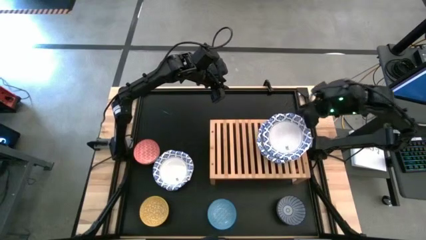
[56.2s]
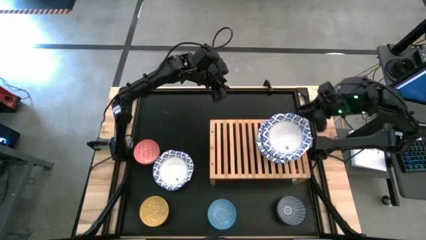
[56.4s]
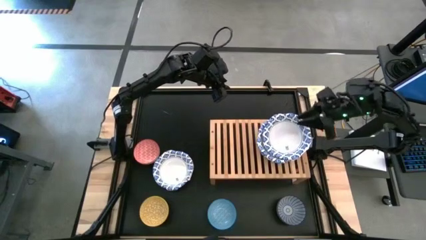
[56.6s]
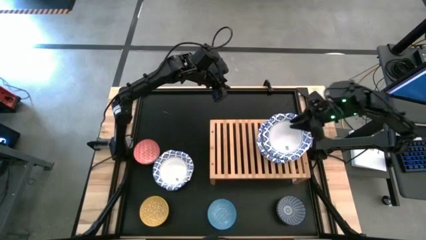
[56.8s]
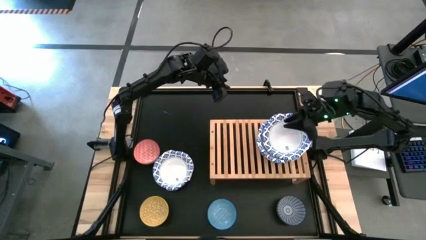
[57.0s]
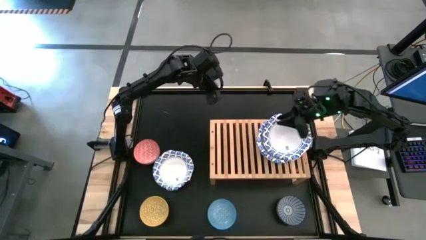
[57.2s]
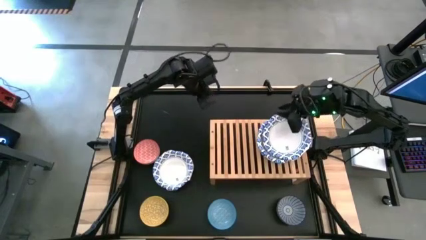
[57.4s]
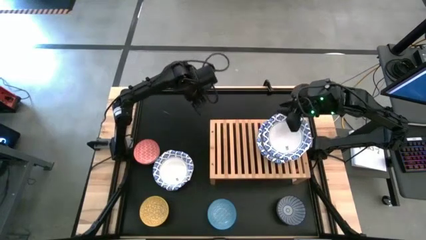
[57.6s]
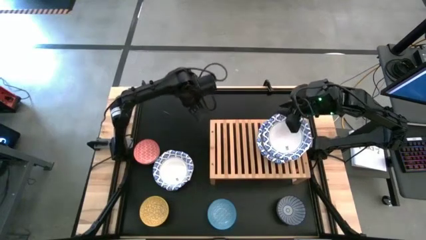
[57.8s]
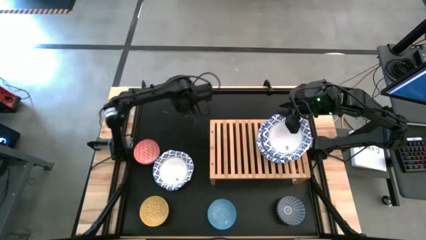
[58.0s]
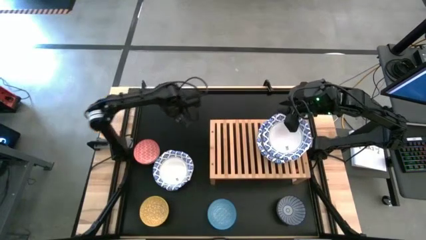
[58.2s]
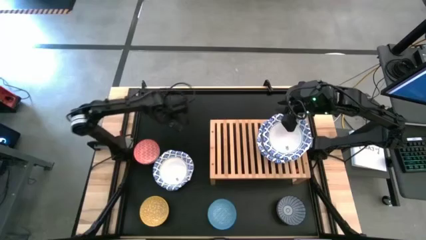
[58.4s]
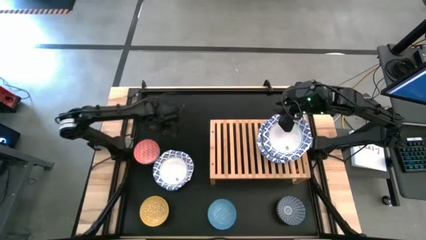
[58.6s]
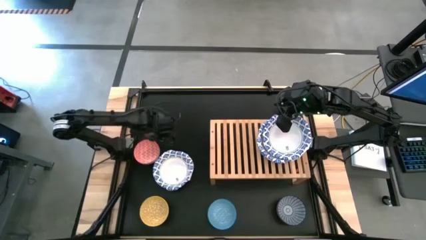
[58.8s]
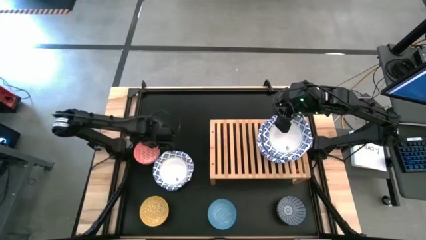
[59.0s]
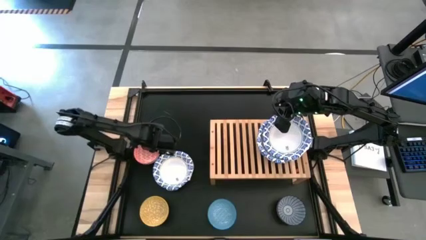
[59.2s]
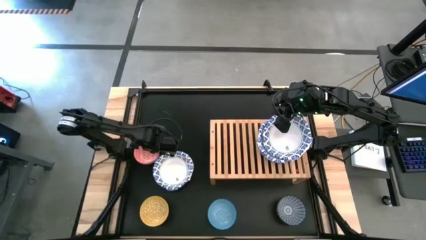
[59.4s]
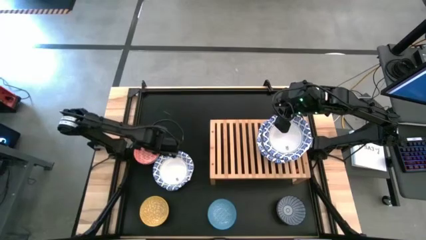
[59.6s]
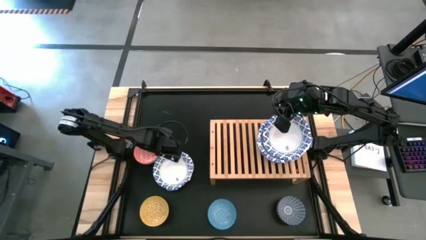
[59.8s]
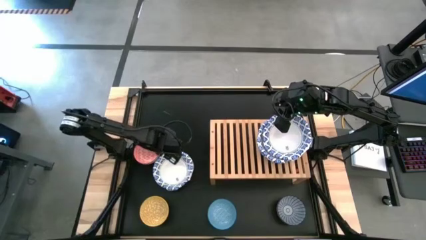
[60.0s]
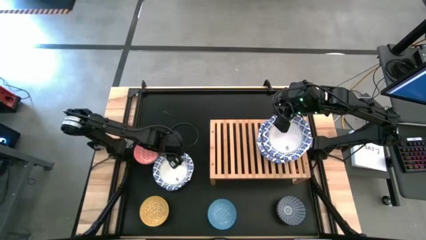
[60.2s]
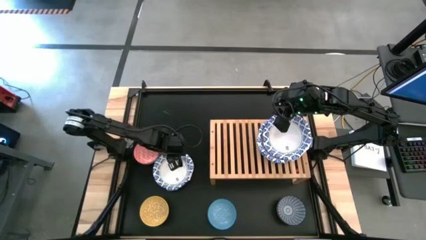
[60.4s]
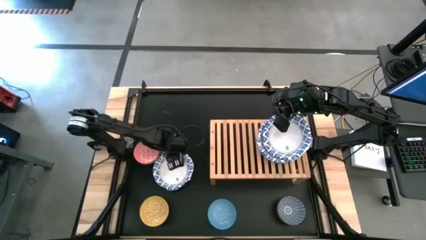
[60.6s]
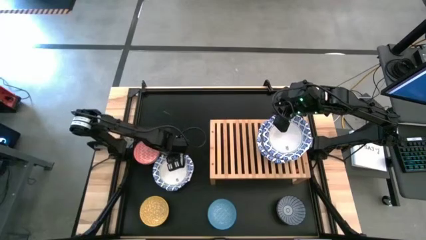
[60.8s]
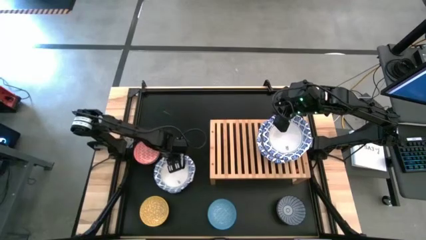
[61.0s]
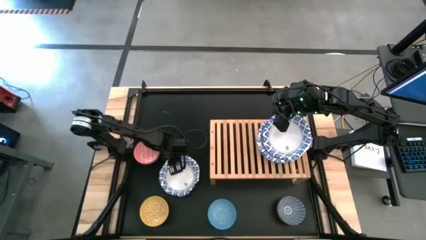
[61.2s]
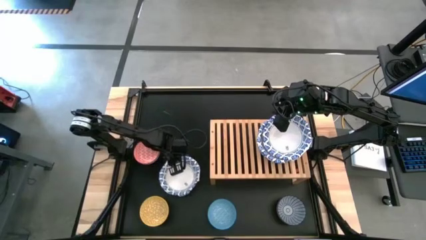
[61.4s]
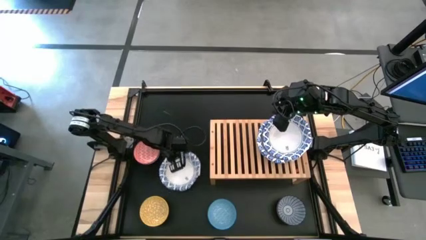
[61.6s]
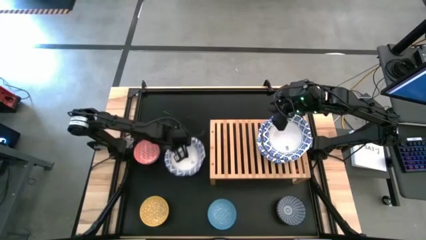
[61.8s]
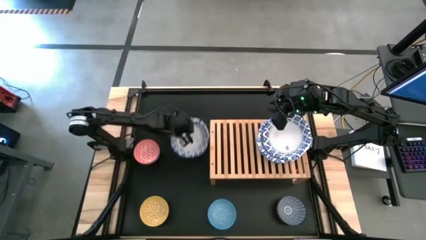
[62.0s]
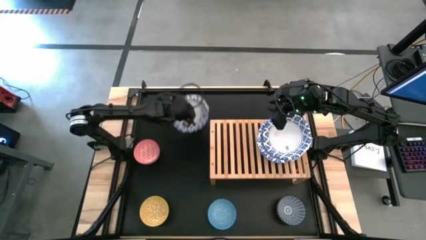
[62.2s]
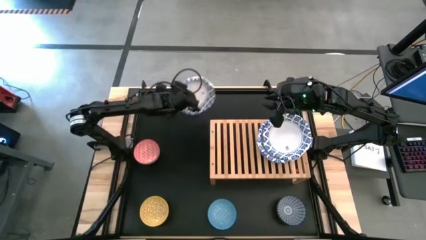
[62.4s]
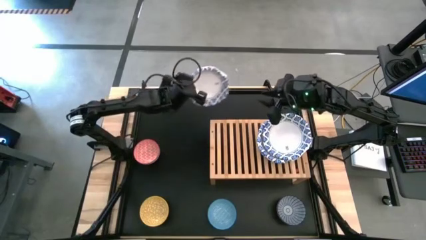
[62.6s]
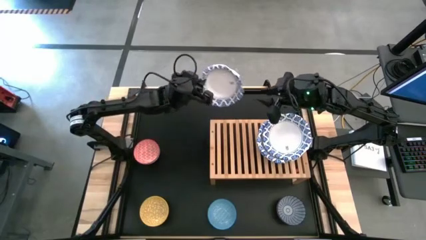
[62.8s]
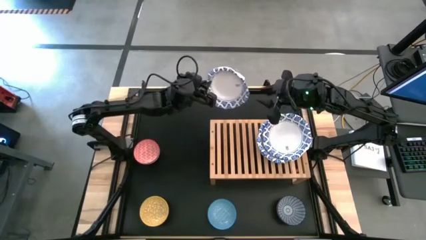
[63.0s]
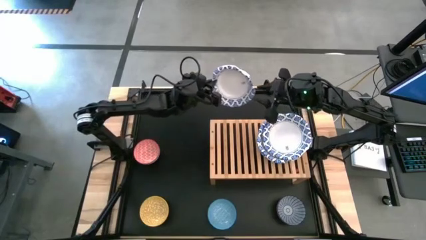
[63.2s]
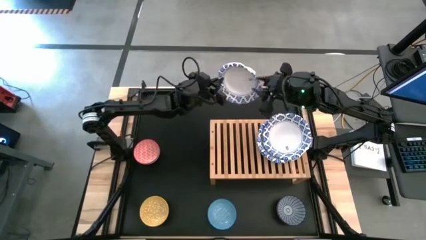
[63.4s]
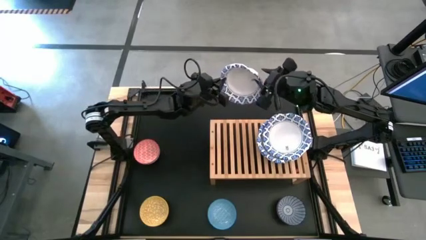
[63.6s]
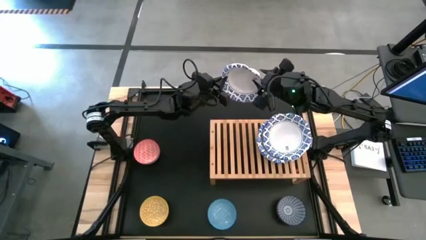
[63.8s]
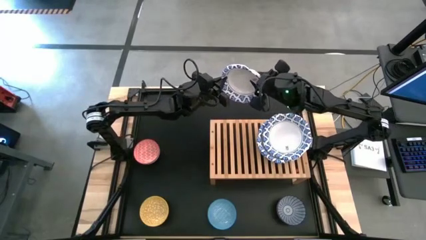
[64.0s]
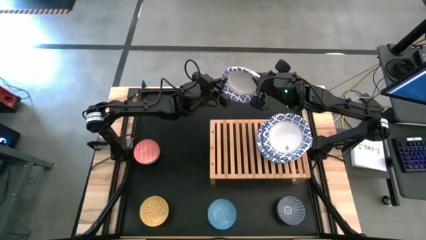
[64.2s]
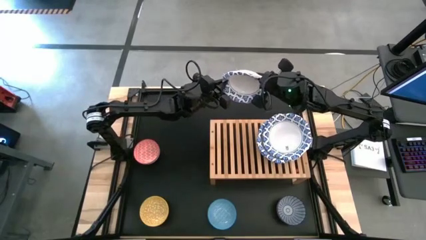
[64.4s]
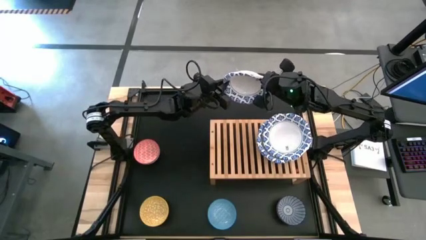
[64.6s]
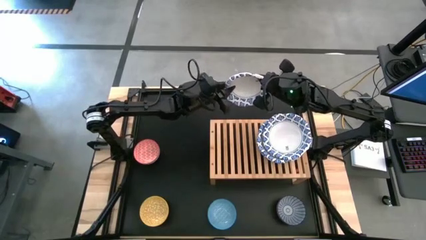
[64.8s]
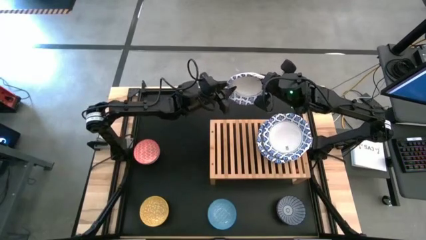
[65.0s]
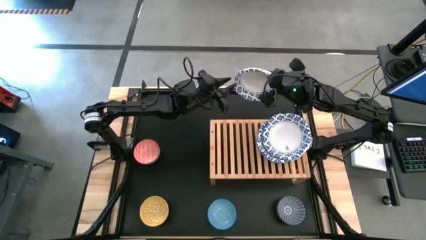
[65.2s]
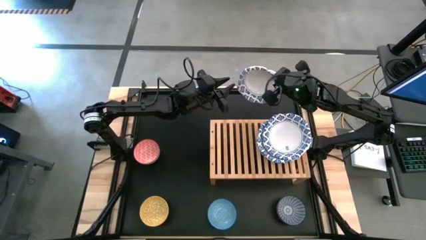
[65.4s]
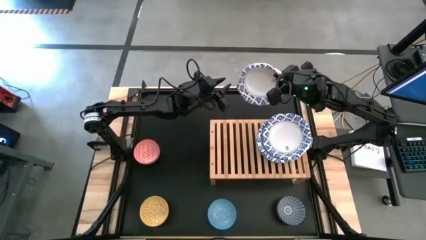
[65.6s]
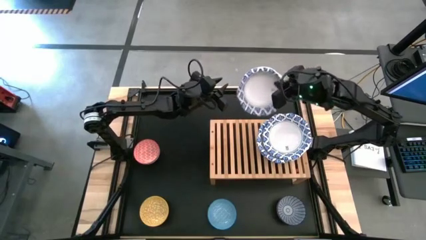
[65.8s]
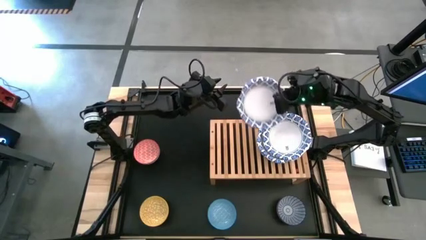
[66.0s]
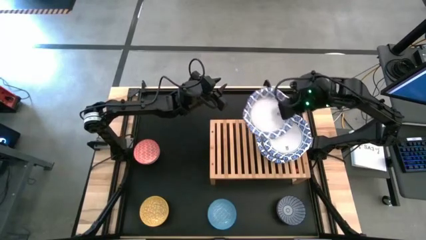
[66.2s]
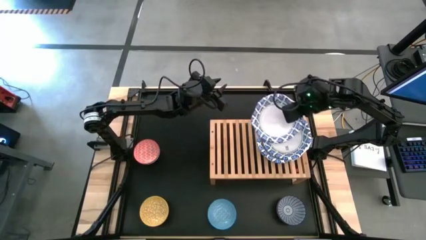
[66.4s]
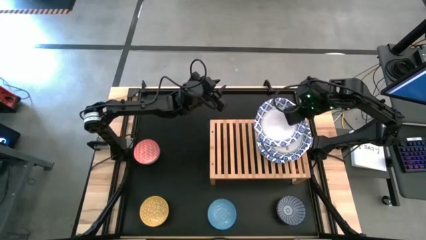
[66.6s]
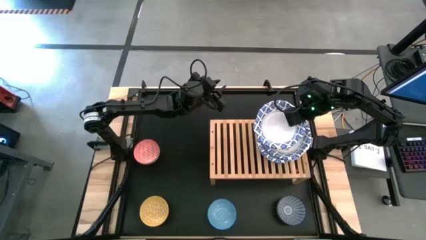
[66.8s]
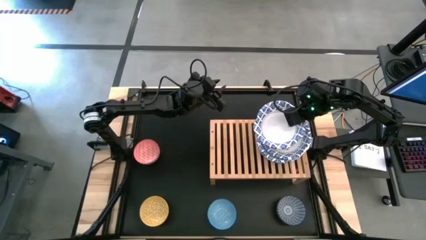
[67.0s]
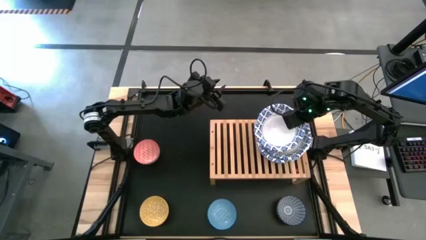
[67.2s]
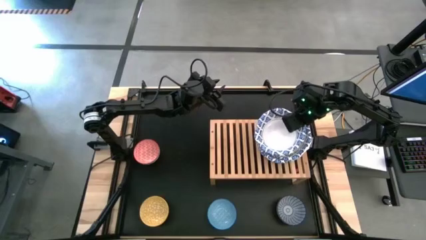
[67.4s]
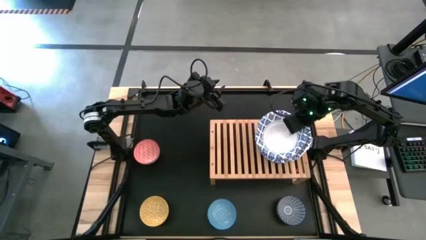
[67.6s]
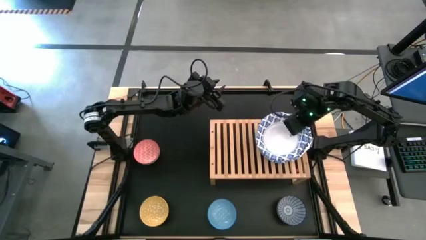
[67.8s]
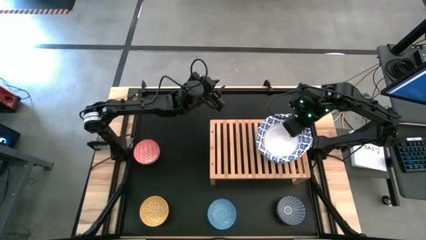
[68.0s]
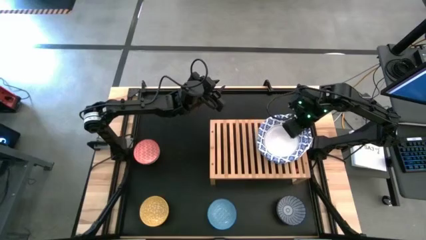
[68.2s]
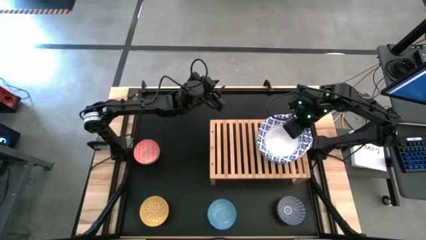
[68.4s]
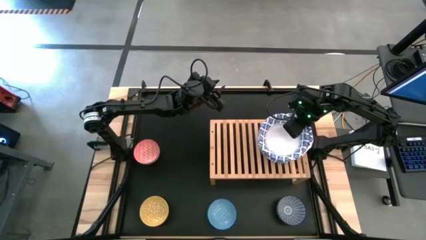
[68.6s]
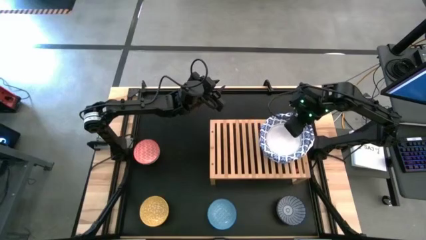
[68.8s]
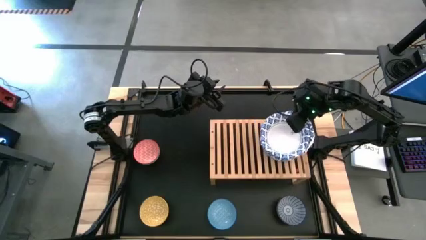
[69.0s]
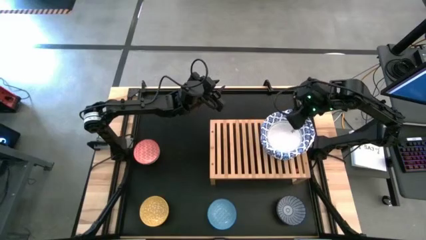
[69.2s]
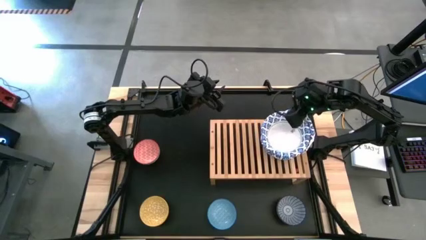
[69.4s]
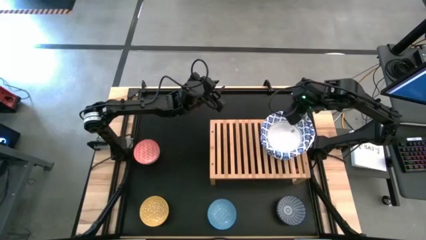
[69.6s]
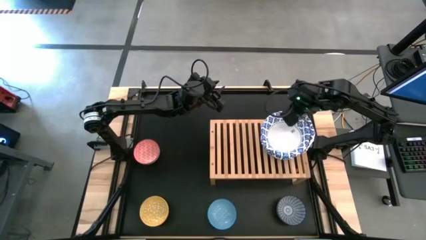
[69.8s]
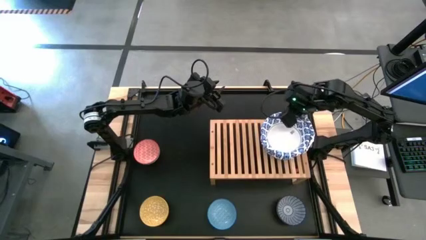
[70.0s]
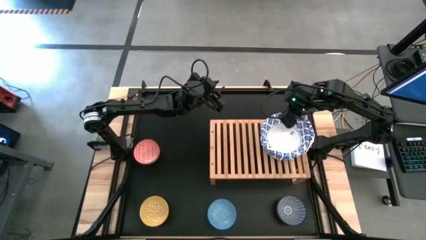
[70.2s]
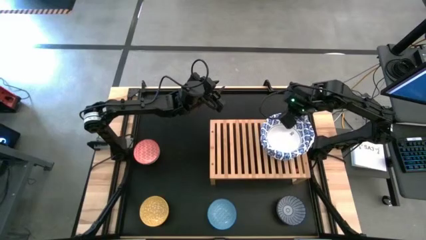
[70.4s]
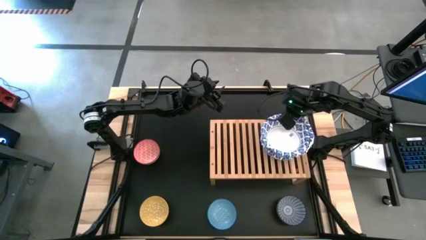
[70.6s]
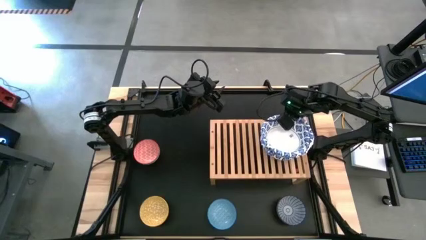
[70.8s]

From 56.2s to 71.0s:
Task: Place and stack bowls onto a shelf
Stack the big white and blue bowl on top of the big white and blue bowl

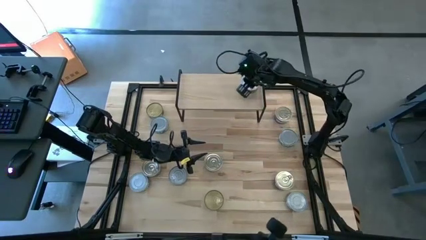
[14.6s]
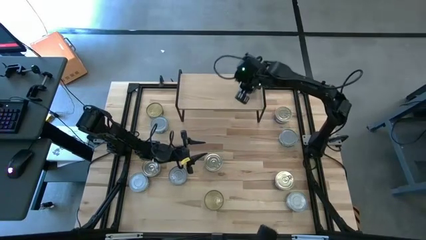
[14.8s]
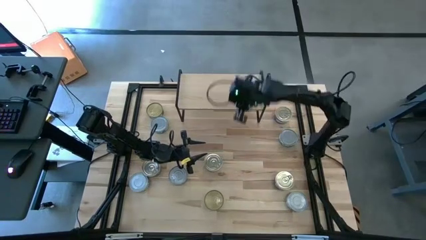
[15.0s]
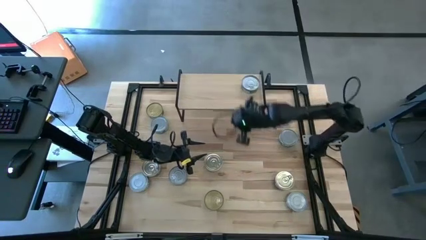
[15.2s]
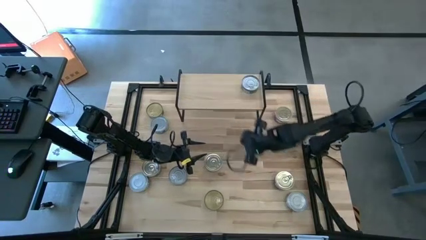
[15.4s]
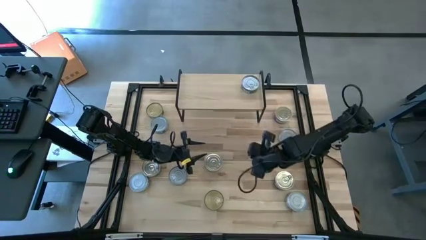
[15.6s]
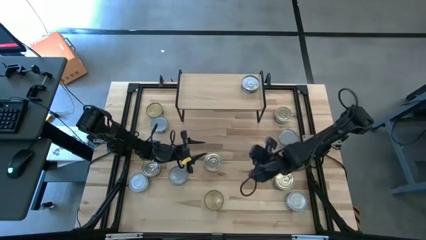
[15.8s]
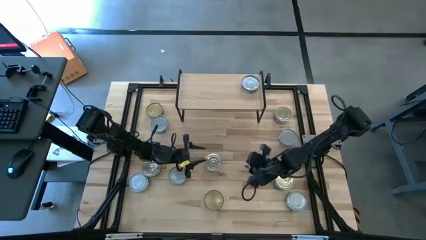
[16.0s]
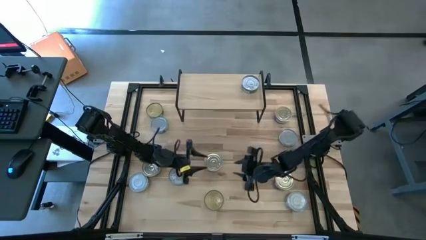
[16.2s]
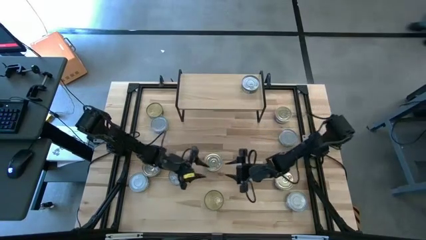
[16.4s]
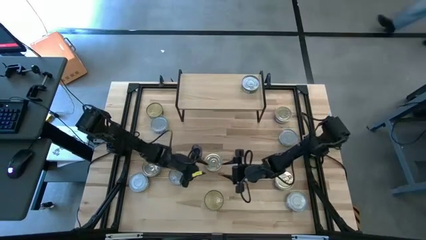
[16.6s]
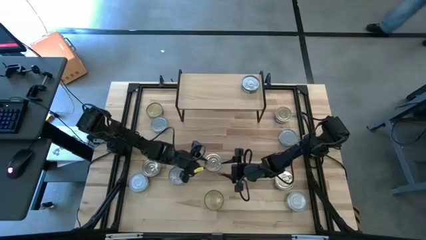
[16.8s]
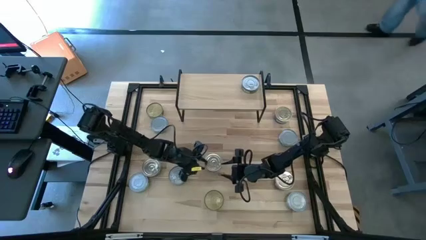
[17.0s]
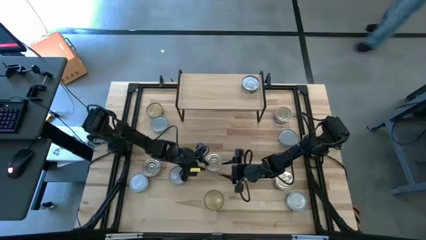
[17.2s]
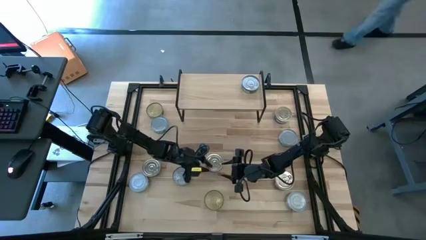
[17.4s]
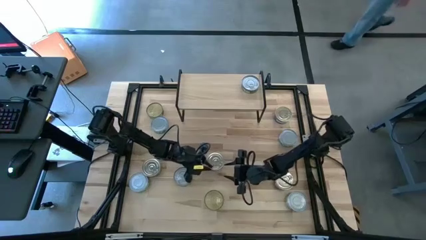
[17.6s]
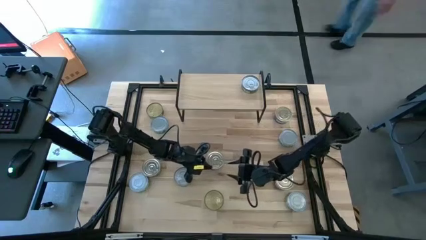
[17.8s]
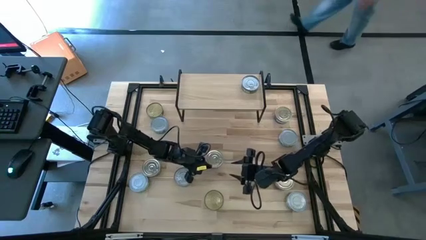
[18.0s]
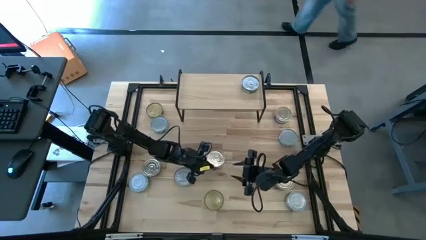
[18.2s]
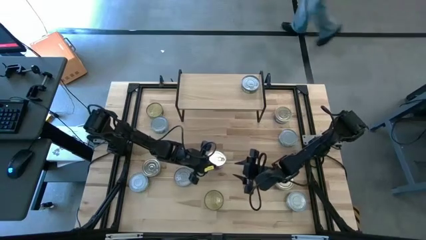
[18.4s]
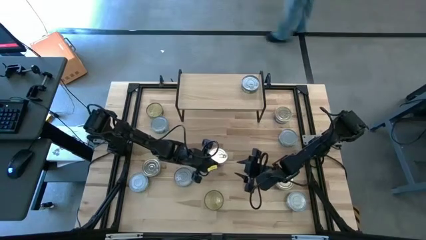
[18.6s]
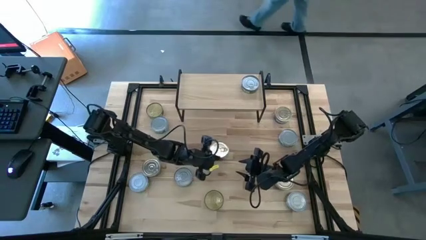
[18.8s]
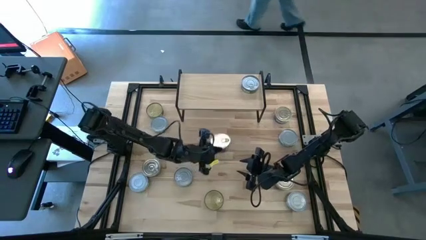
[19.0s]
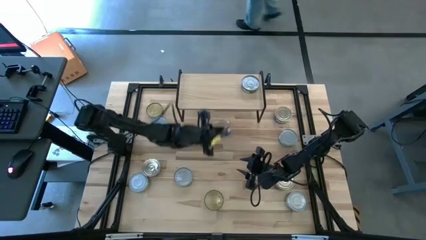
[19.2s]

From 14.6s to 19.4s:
Task: Stack canned seafood by type on shelf
Put the blue tuna can on the shelf
